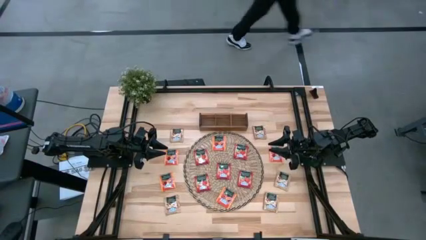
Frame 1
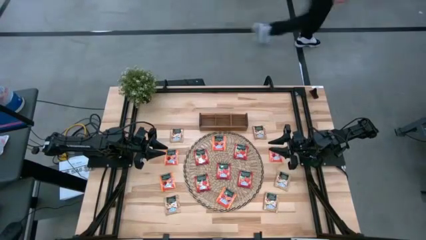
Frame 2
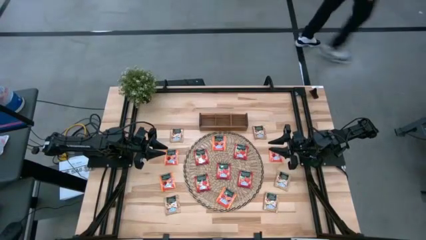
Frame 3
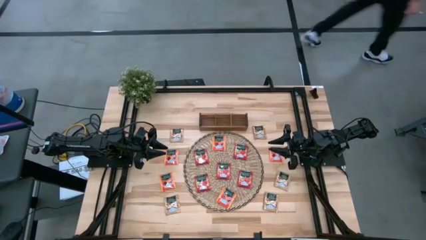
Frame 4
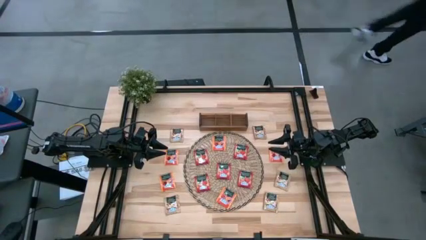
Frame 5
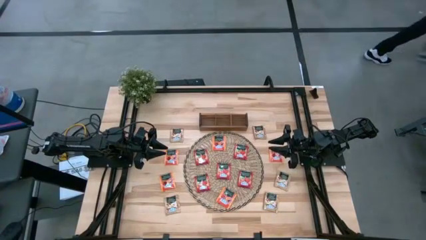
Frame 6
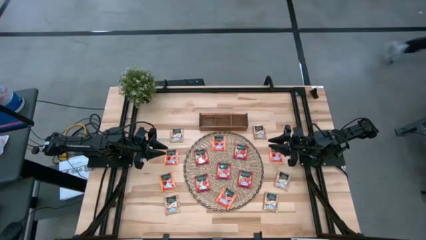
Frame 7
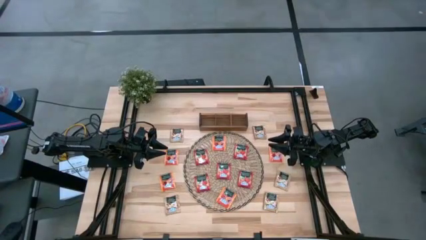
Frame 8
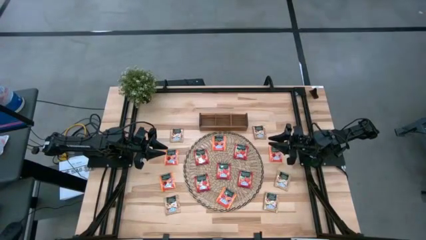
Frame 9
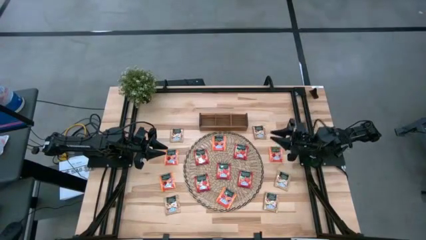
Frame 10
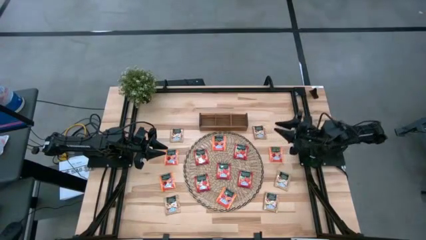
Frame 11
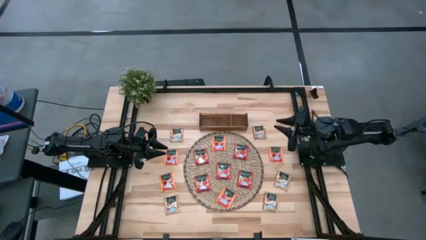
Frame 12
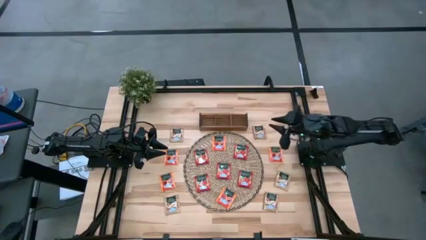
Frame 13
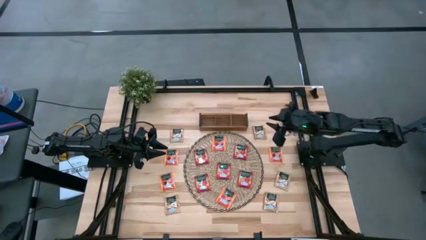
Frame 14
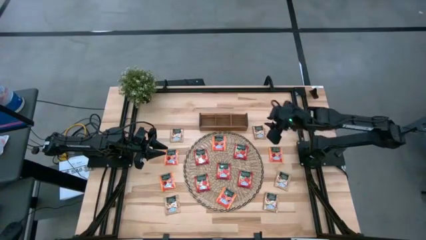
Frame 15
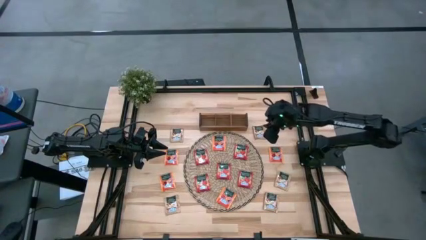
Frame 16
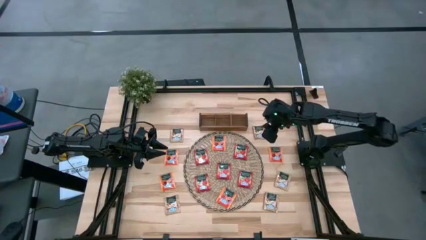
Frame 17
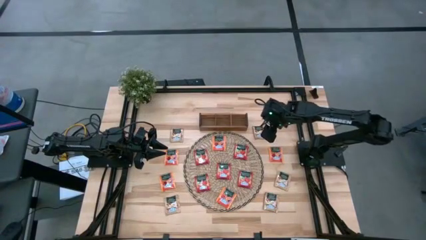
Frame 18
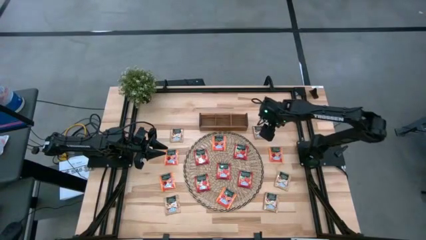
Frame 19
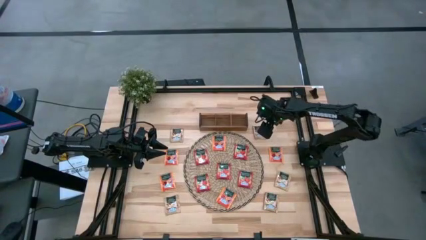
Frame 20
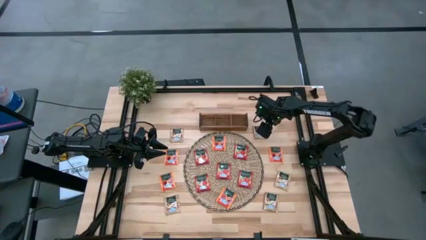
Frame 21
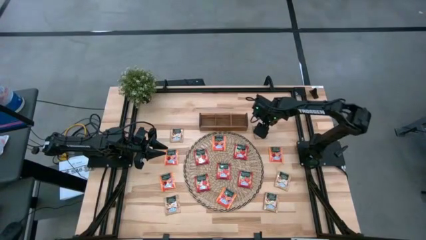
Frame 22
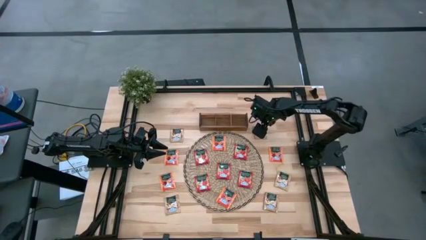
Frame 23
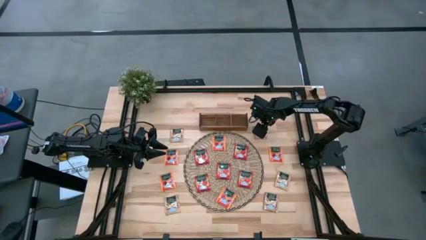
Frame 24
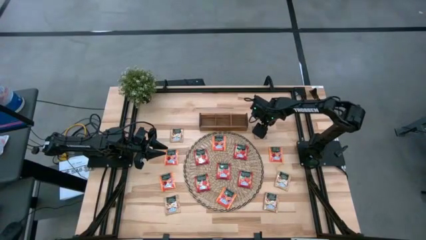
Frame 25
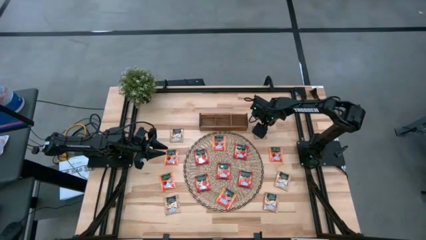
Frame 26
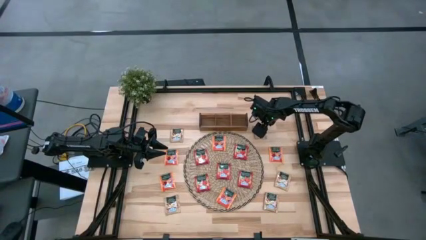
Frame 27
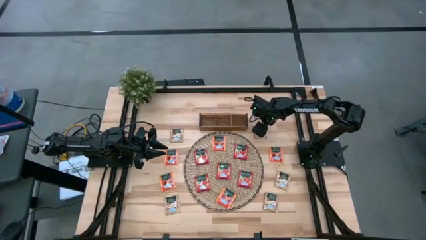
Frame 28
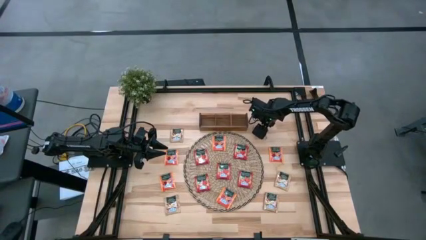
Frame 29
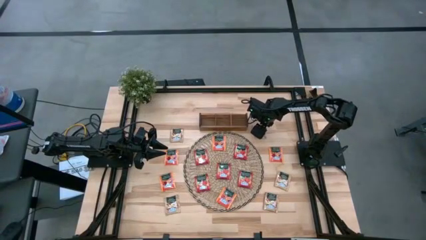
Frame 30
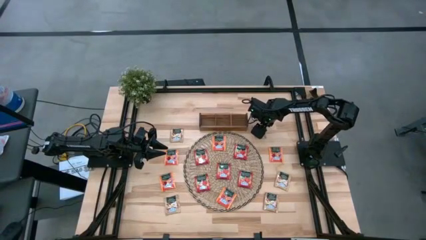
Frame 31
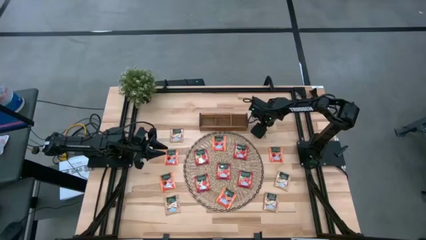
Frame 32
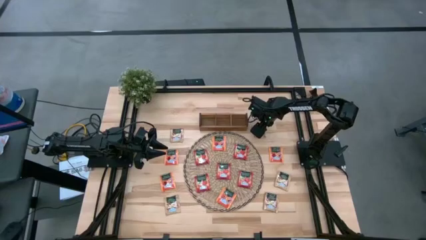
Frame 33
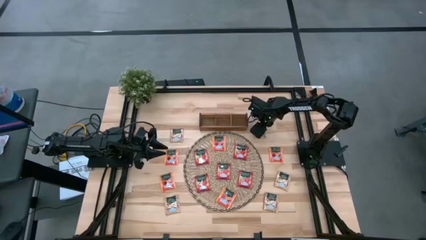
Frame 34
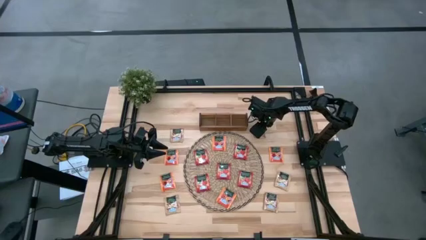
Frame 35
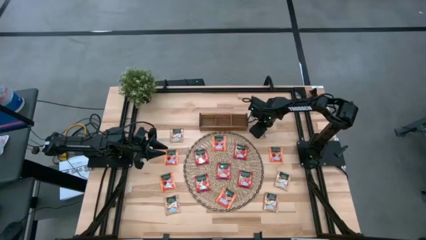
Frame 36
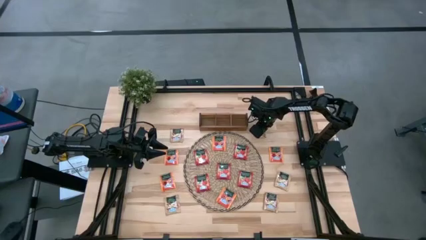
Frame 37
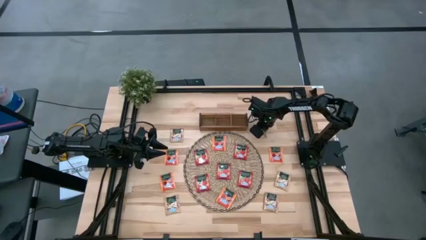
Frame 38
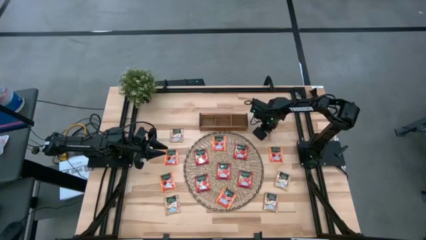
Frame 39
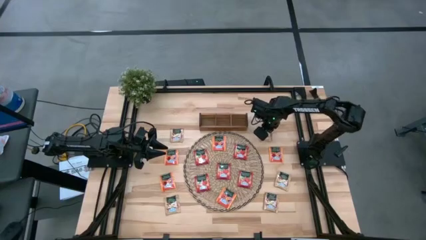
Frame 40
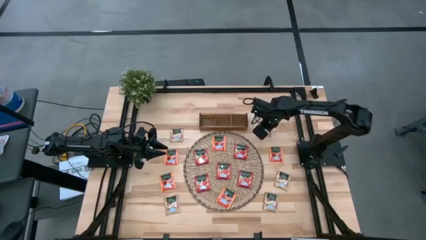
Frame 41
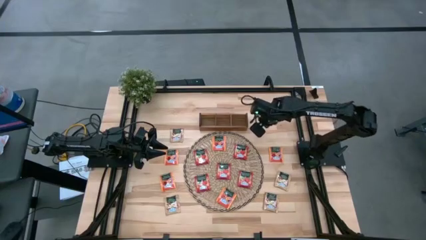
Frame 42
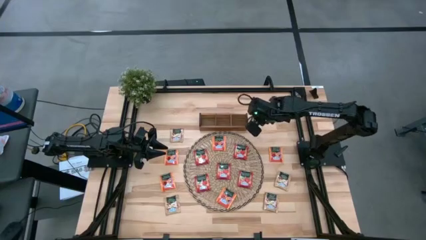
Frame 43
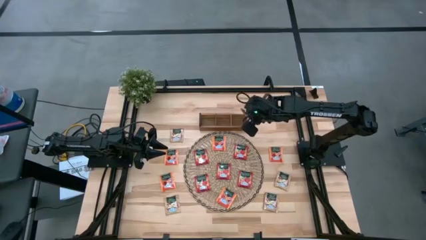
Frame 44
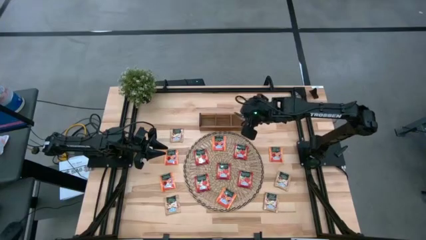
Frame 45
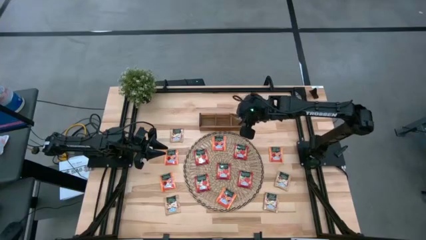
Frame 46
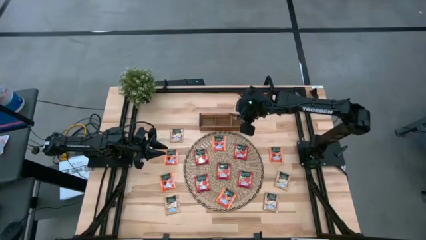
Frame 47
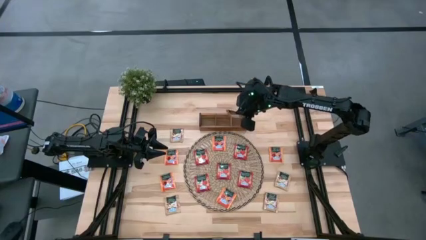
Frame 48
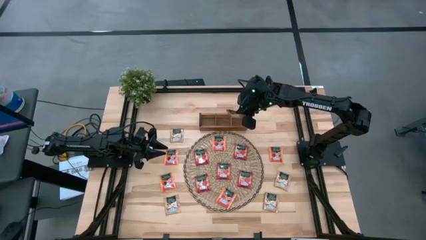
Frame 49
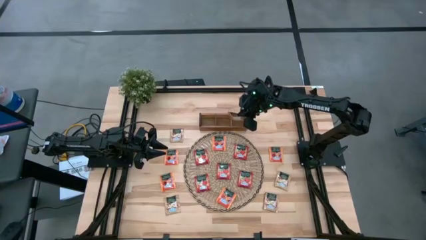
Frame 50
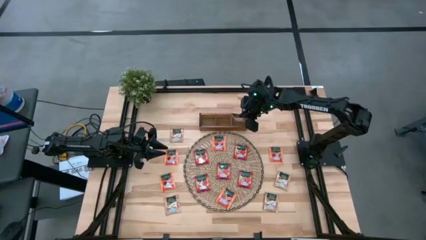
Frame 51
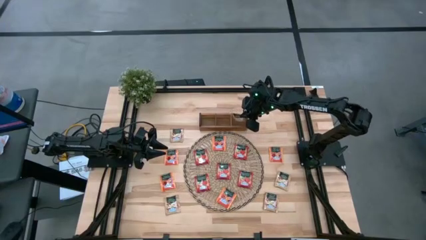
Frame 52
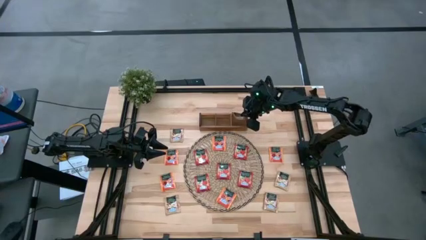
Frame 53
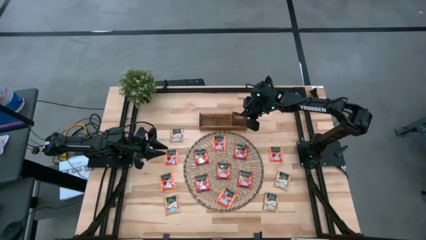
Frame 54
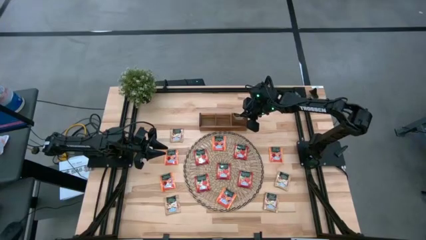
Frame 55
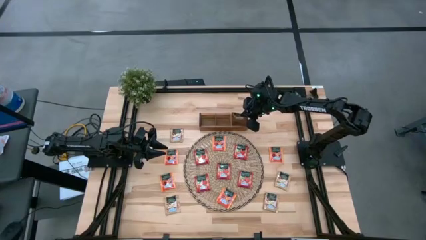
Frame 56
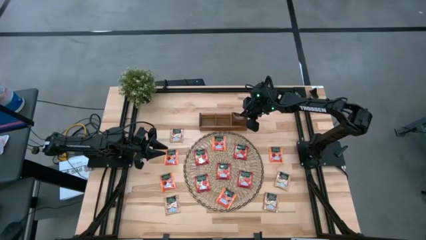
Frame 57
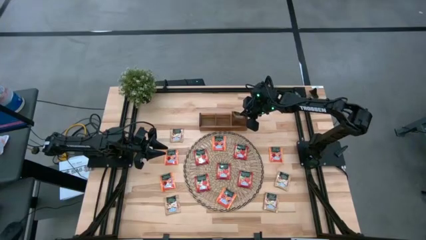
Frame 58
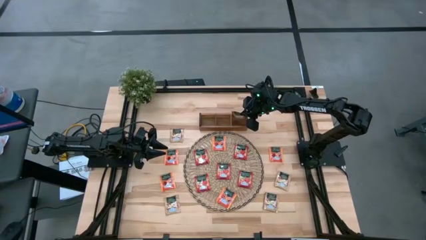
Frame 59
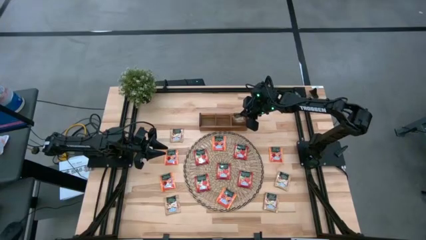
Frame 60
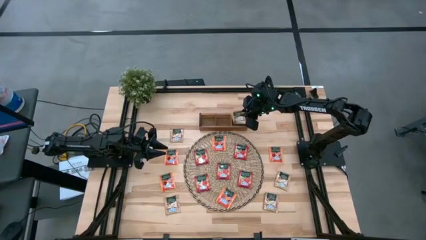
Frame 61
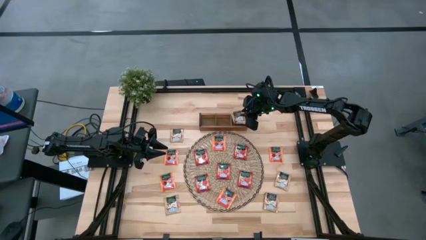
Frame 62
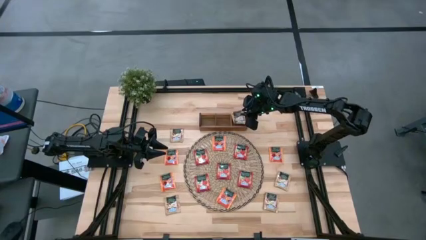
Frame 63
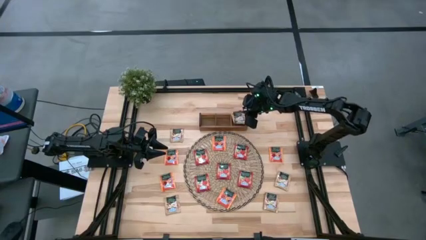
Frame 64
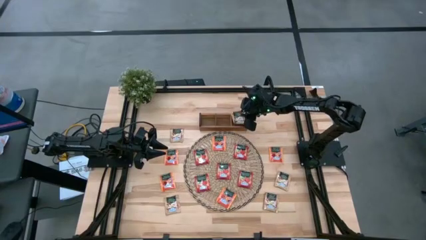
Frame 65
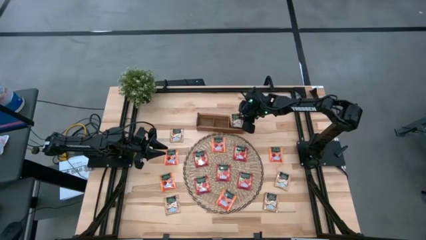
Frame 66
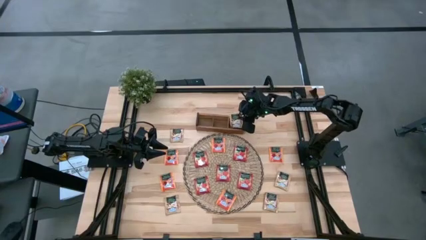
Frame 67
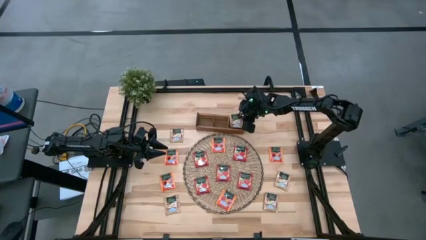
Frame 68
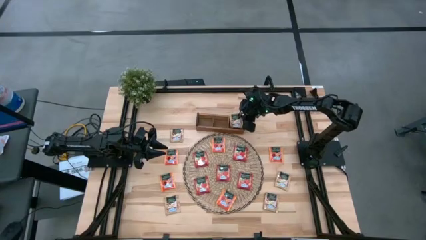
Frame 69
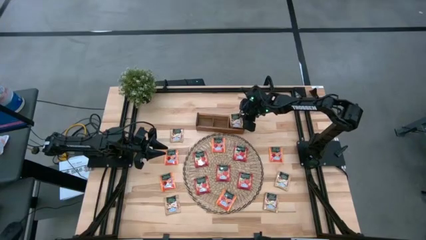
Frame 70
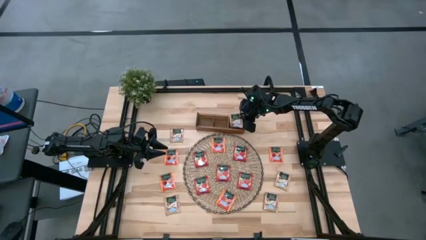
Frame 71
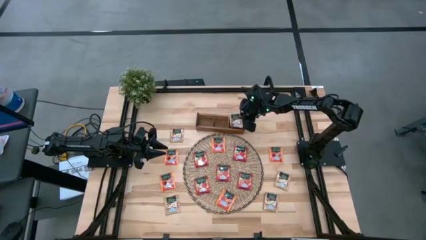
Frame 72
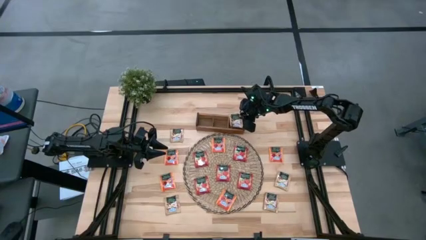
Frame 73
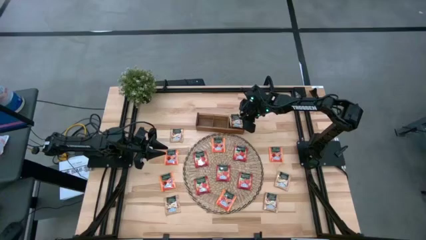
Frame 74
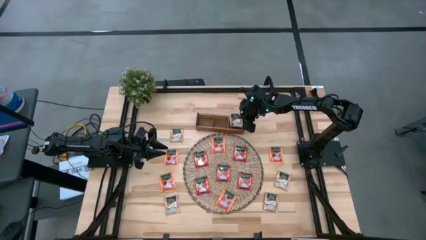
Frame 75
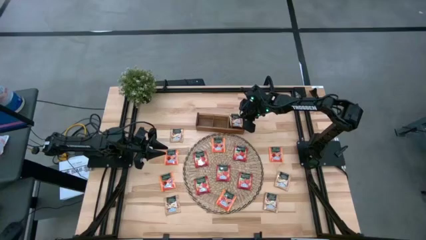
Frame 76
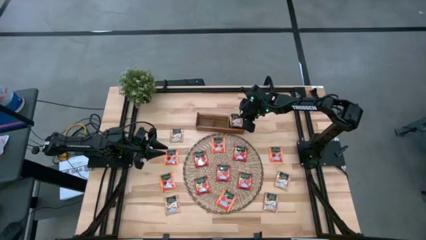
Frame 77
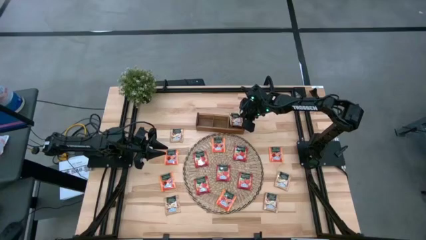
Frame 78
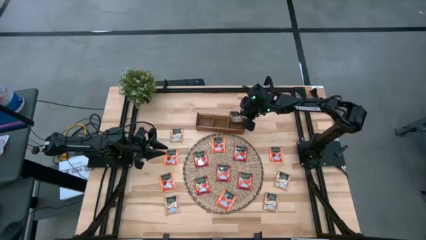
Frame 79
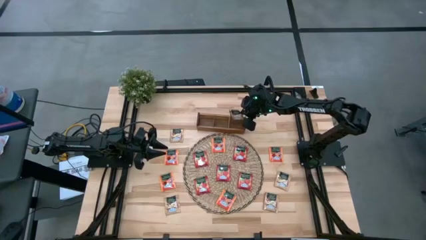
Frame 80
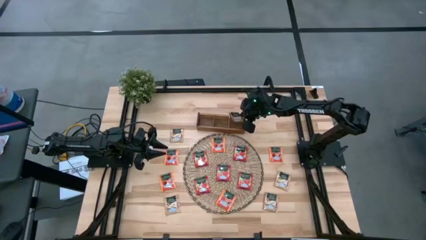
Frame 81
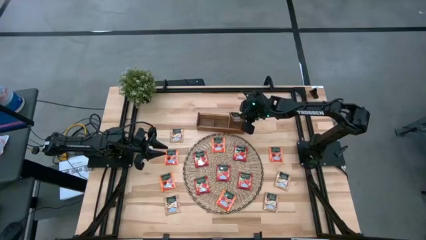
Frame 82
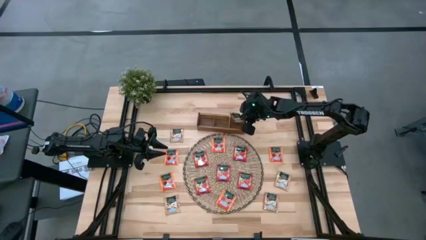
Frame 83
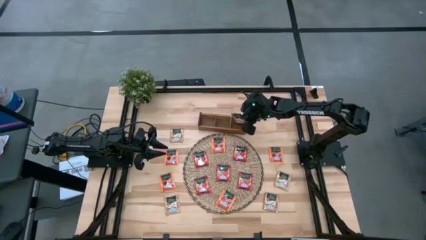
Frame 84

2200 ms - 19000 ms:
Task: Pick & Place Tea
Put the brown tea bag into the right section of the wooden organizer
